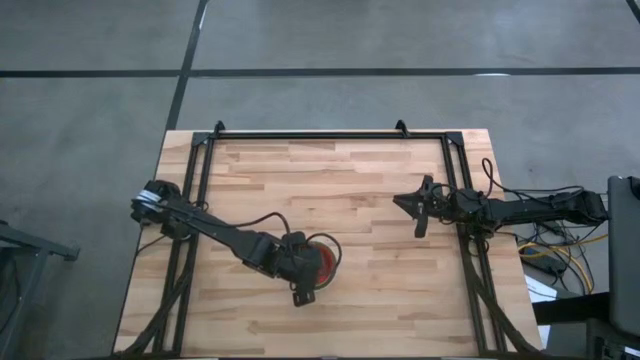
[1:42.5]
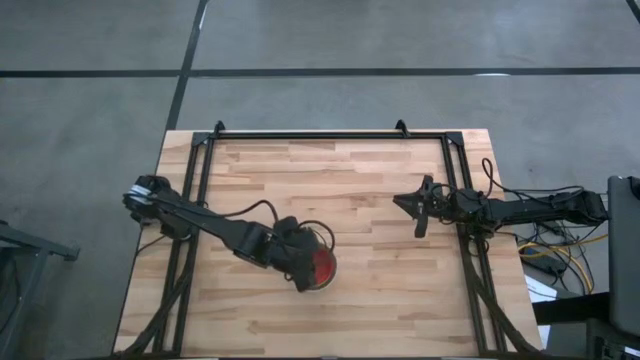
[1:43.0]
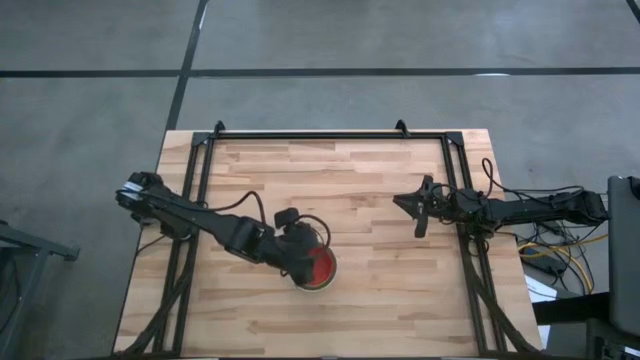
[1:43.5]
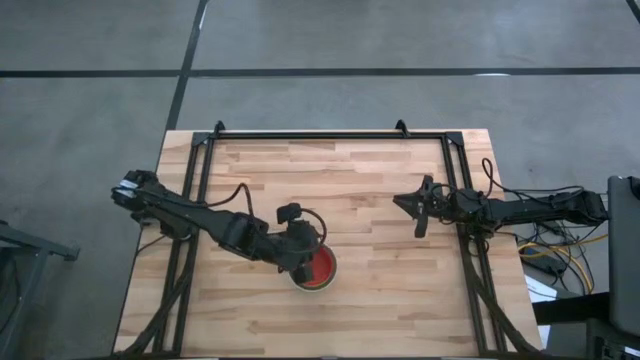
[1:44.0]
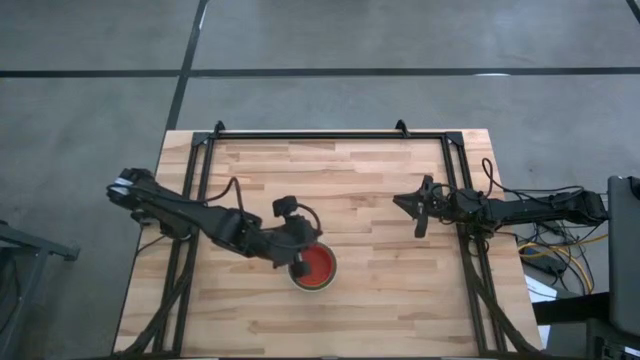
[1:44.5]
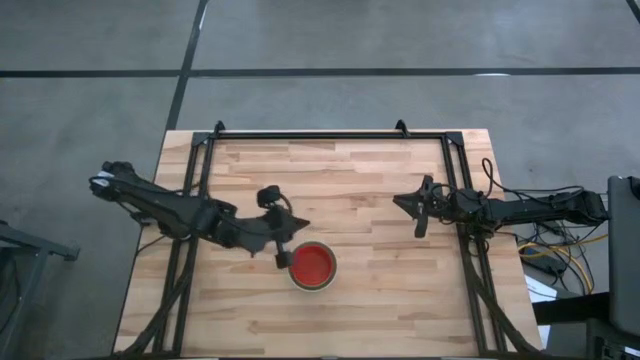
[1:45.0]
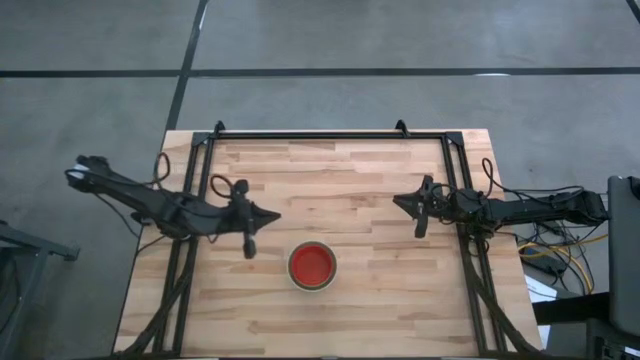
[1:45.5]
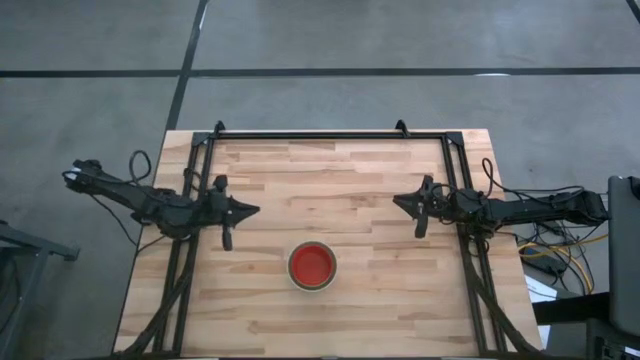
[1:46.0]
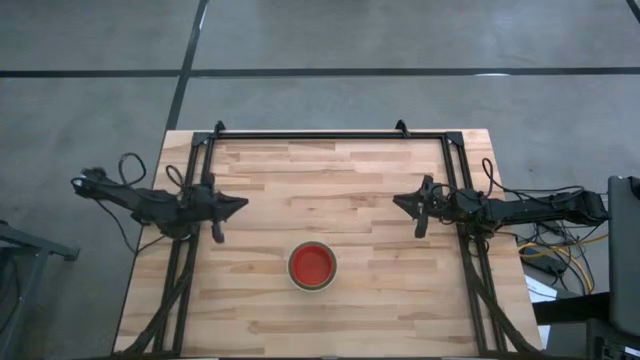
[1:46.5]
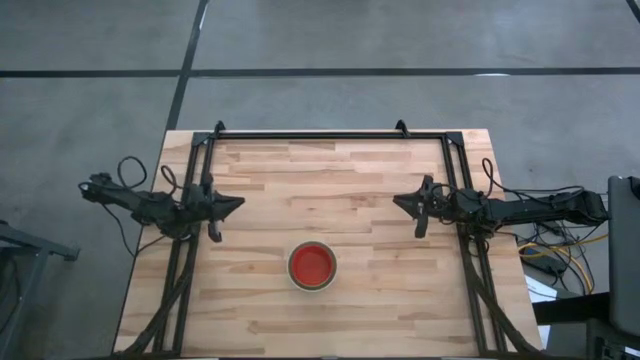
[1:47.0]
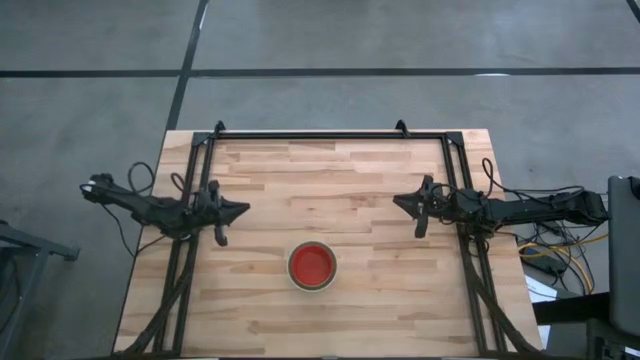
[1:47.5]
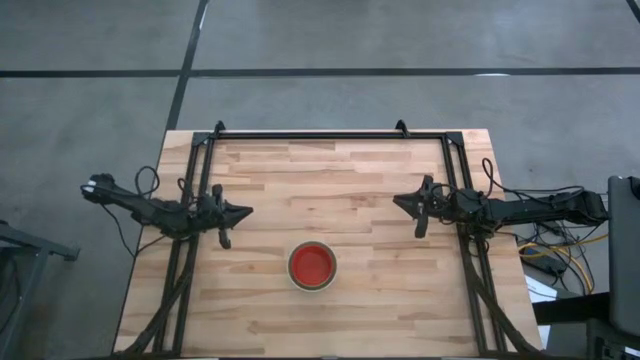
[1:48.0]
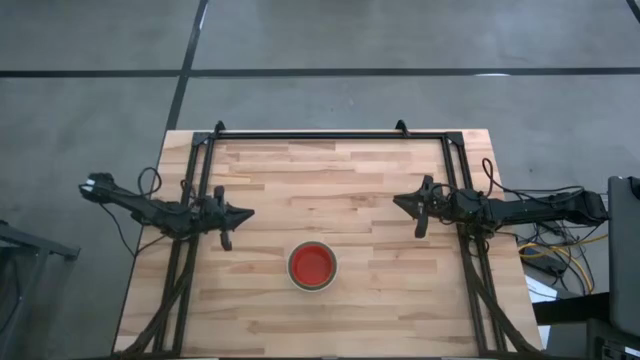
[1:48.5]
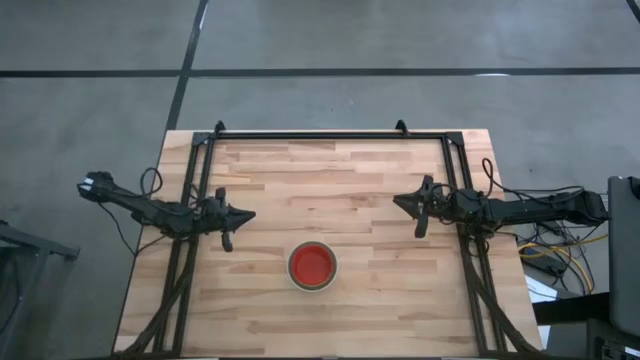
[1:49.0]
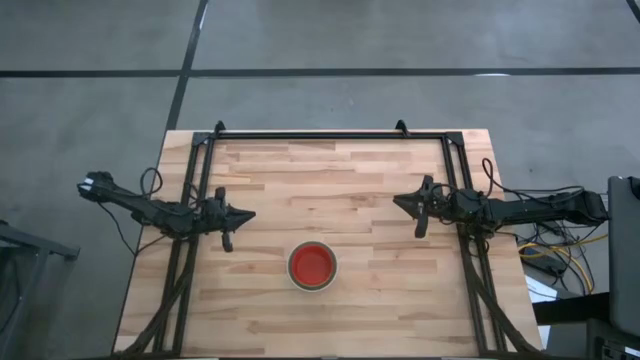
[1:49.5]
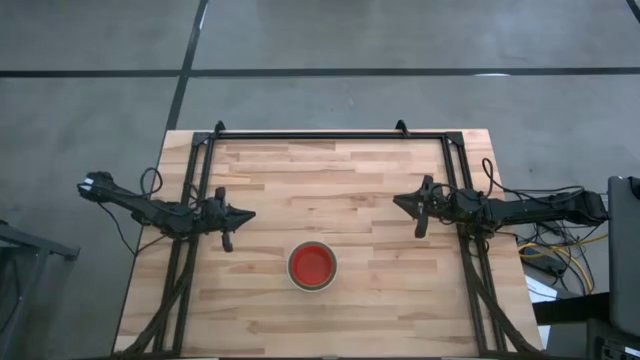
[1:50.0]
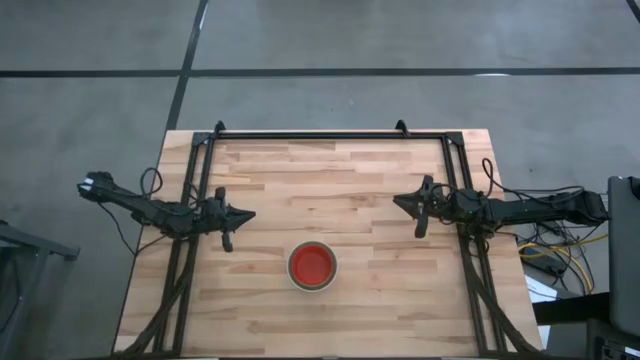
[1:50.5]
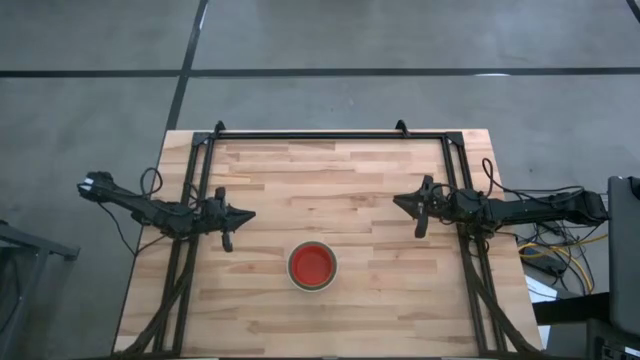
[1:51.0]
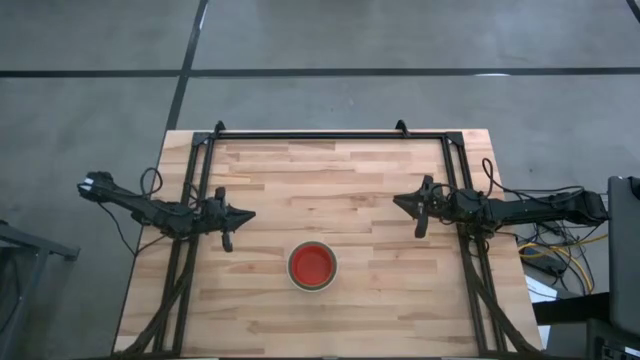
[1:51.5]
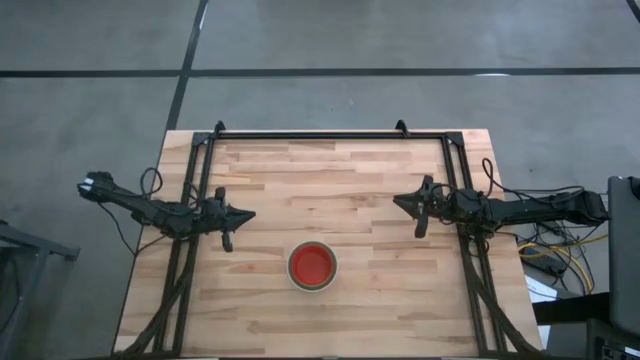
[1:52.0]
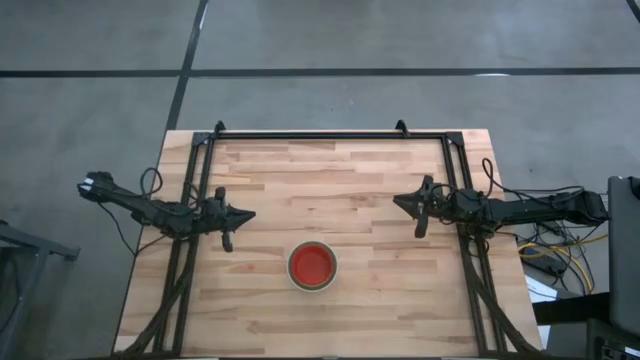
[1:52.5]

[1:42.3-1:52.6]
Return to Home Position
